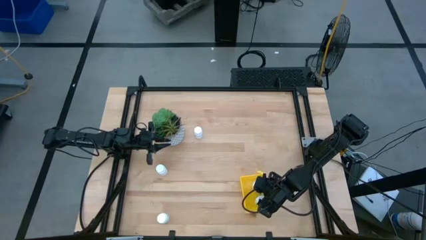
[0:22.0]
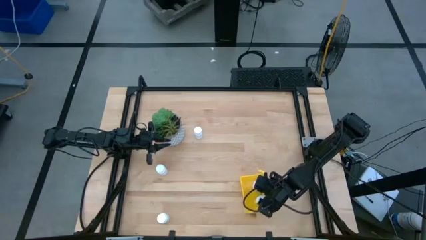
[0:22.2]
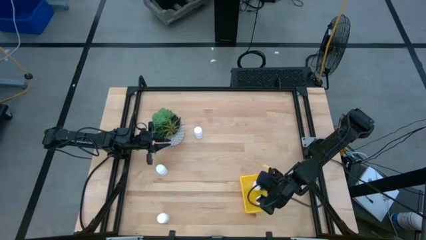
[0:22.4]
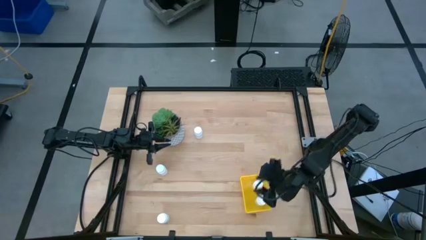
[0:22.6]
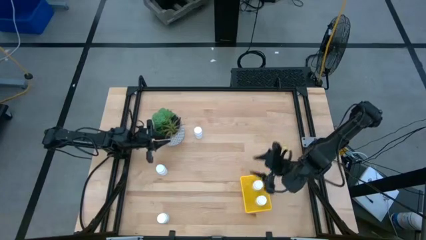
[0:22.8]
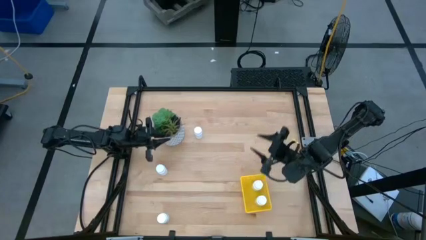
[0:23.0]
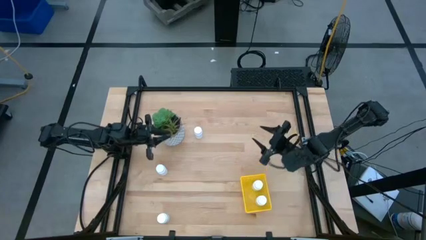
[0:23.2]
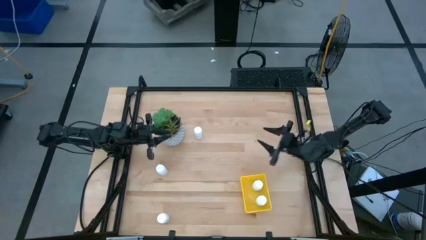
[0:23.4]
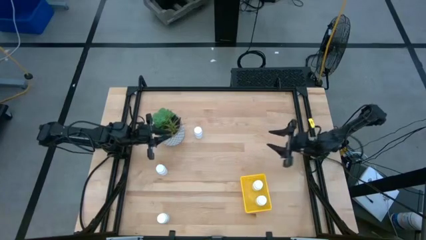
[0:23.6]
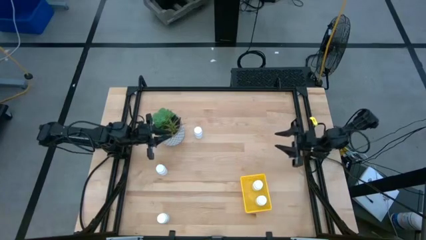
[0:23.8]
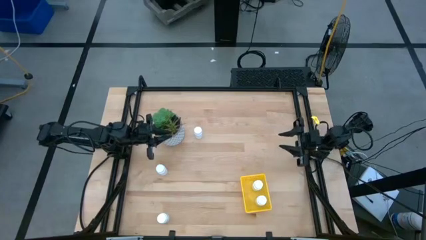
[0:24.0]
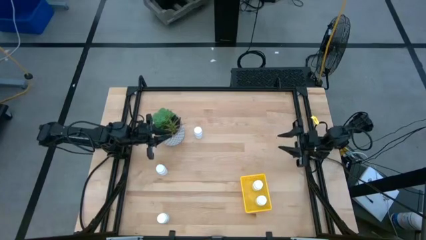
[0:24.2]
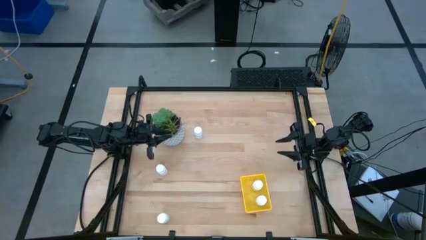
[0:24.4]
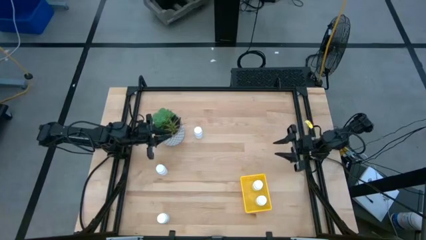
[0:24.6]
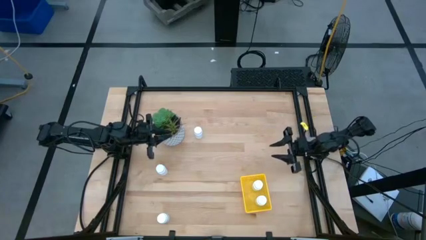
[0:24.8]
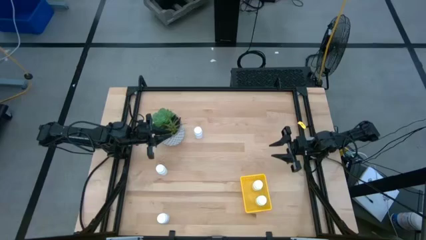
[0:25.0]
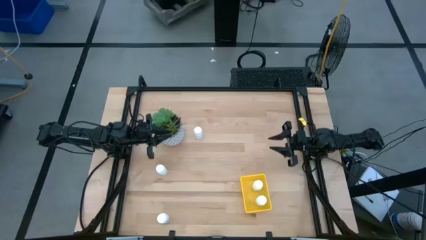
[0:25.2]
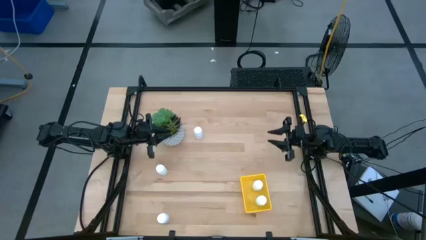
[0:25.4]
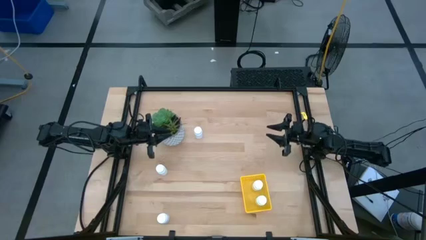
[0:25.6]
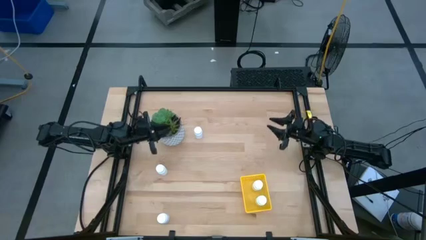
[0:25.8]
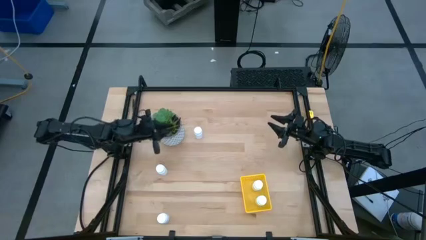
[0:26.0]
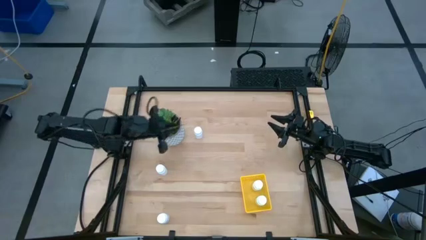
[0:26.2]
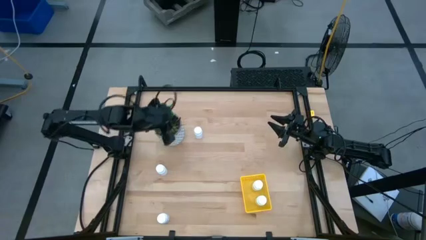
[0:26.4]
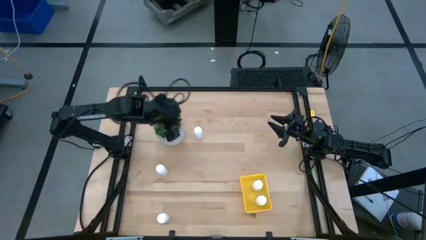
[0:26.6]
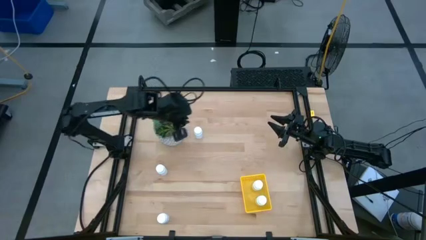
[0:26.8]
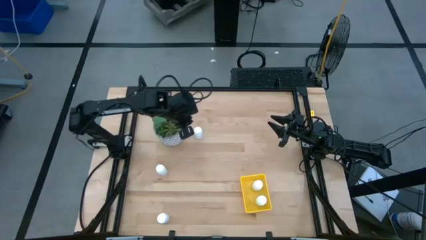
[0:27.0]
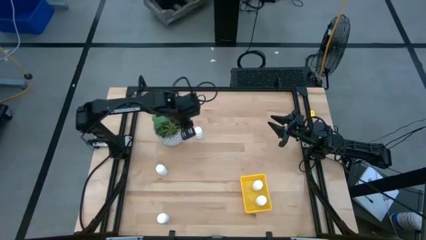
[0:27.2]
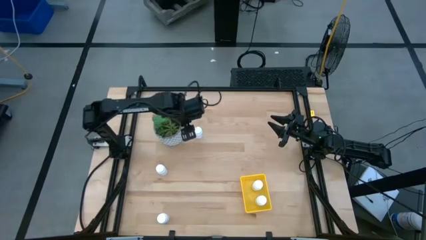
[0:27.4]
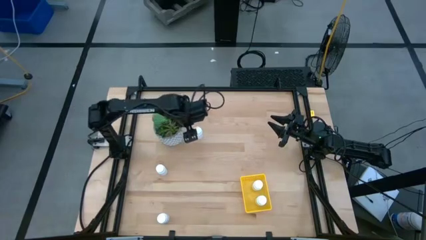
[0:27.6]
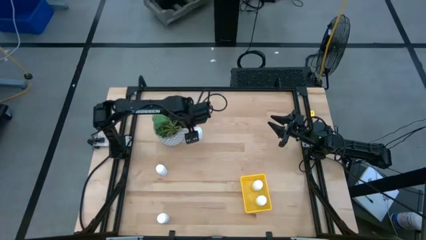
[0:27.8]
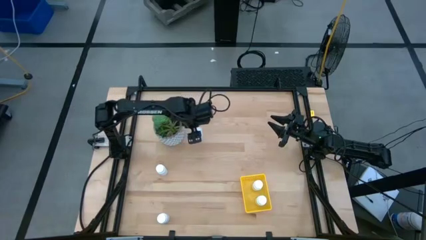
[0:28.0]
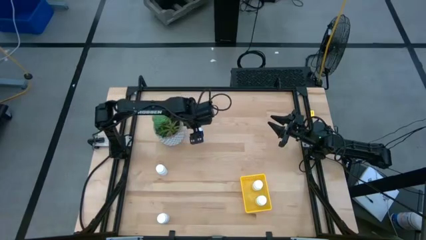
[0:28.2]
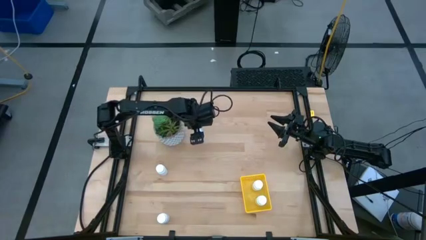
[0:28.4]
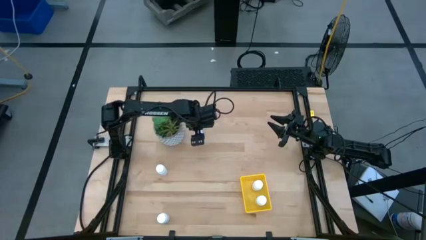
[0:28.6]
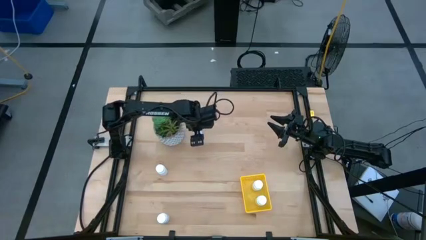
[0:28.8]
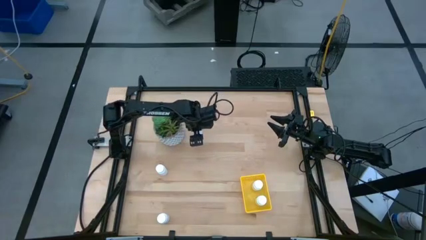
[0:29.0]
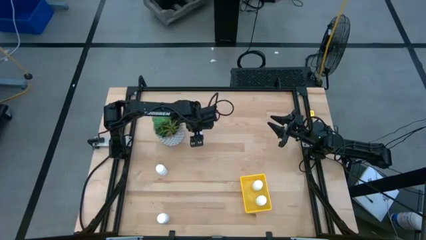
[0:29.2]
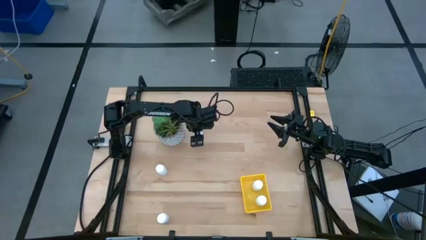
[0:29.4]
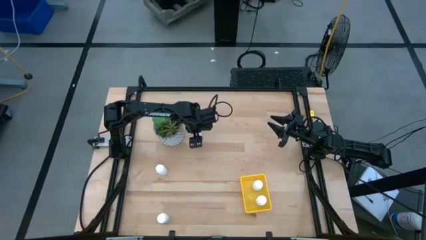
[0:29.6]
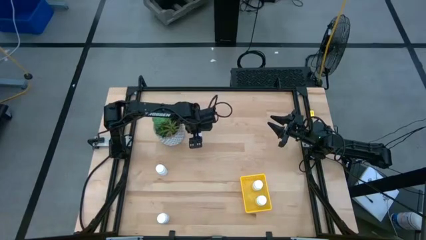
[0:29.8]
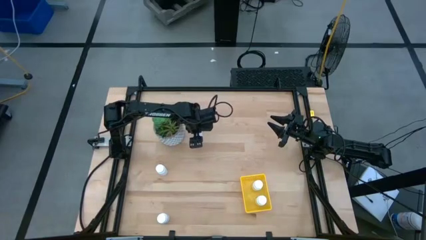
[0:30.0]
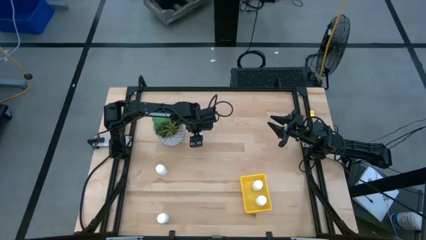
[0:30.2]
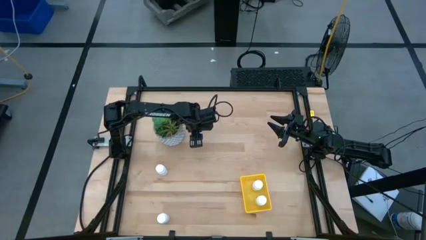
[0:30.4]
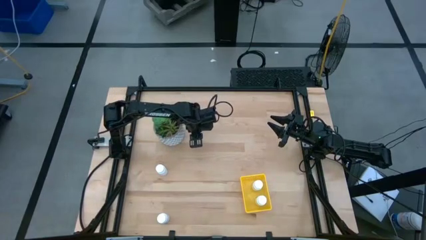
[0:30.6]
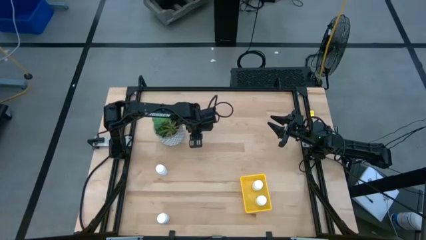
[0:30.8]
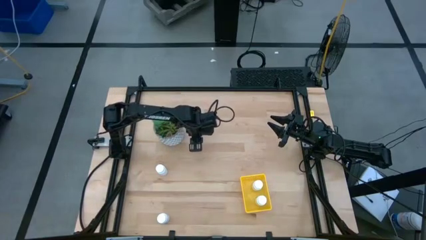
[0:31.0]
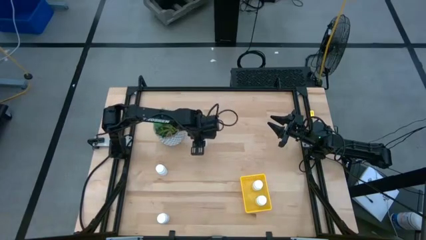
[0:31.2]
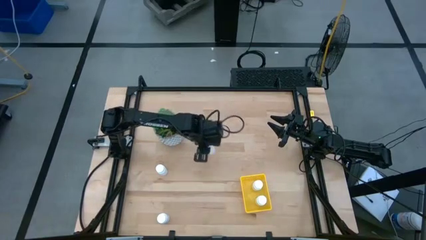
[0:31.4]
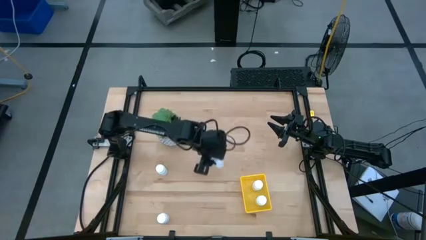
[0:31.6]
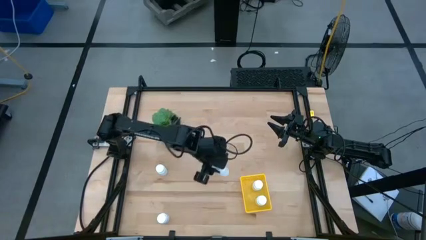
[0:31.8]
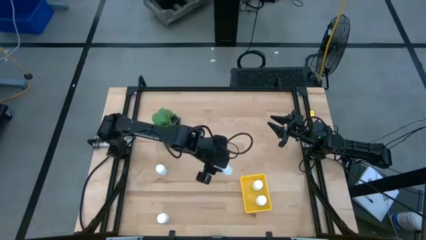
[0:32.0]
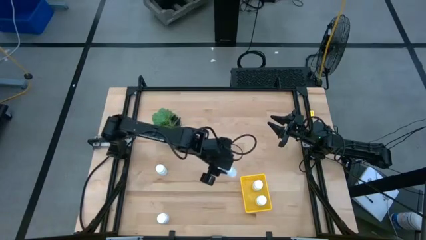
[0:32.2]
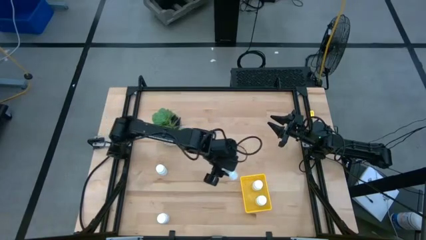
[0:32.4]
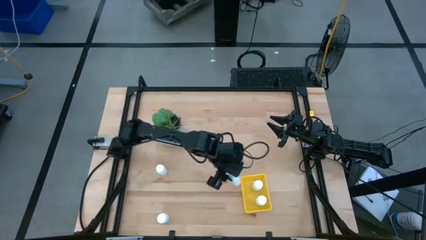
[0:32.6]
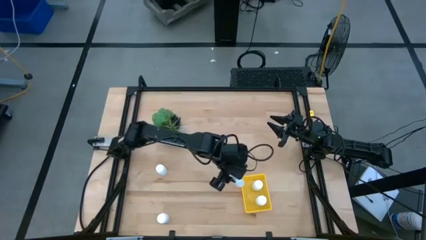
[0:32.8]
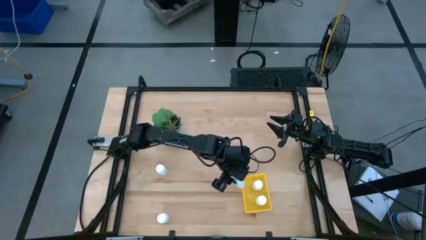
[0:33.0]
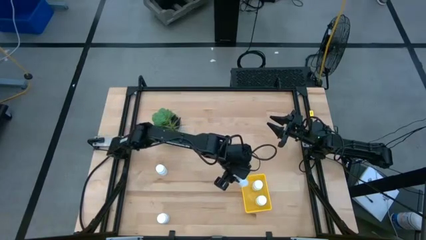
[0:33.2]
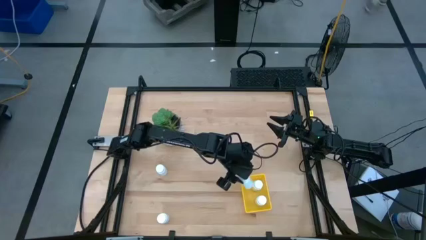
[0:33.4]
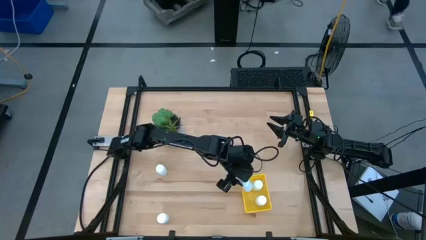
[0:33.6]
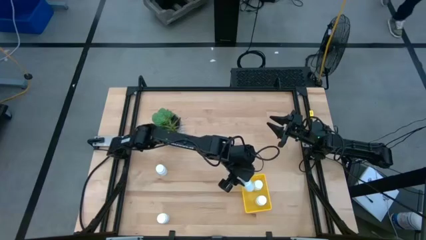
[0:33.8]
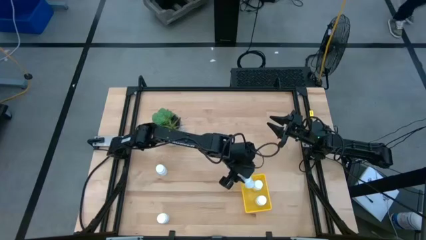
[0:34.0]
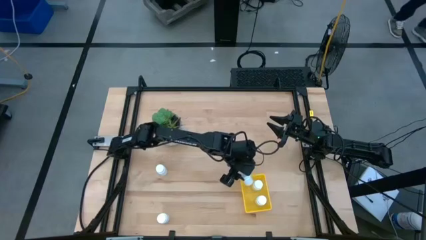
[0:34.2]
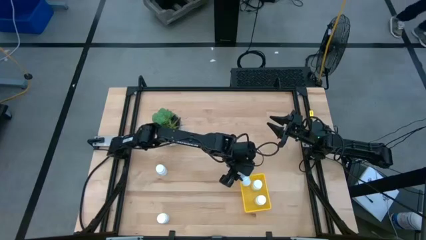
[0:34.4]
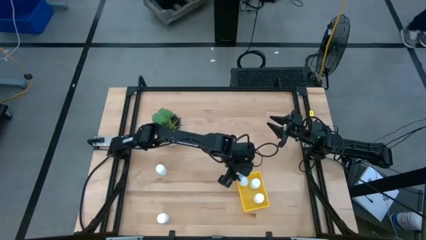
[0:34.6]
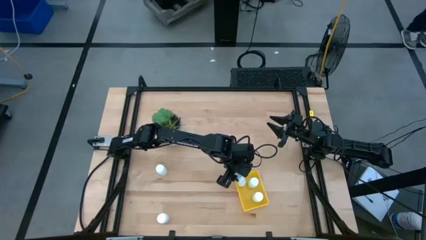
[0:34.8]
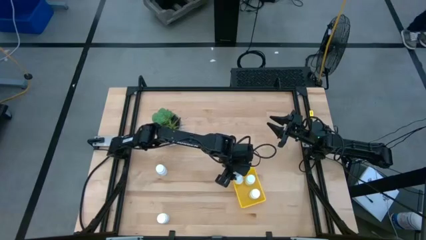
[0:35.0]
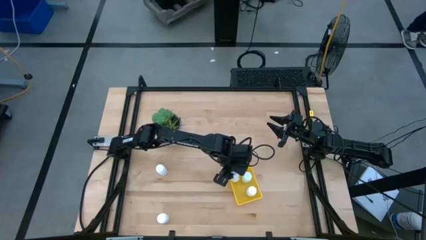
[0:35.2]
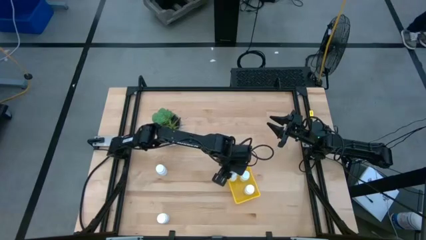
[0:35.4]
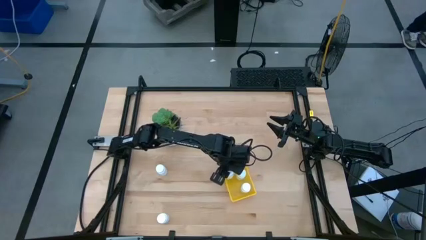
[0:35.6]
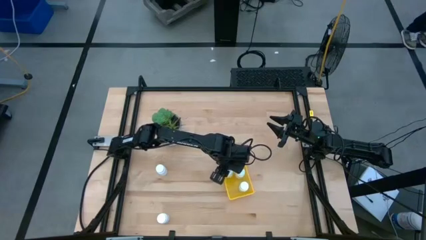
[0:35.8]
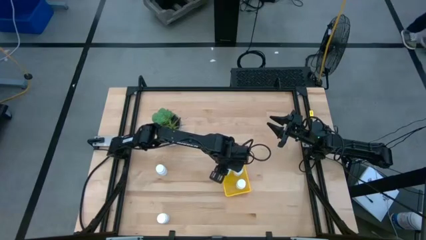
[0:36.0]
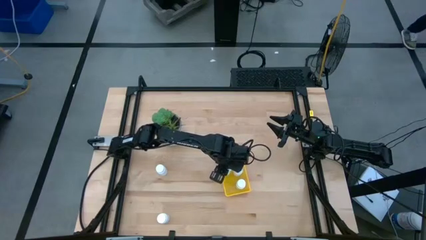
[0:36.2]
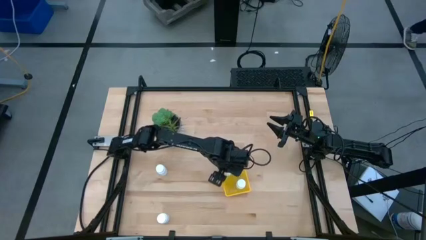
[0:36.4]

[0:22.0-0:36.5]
Task: Pick and place pill bottles into a basket
Put the top pill bottle into the basket

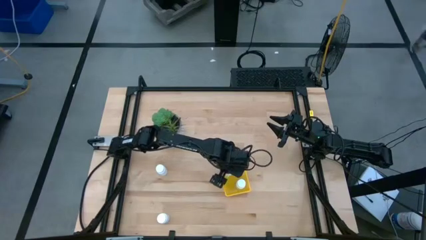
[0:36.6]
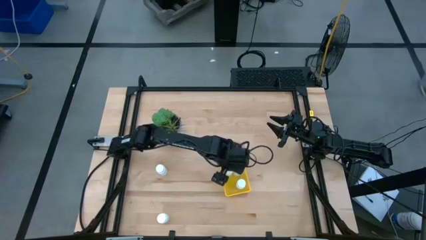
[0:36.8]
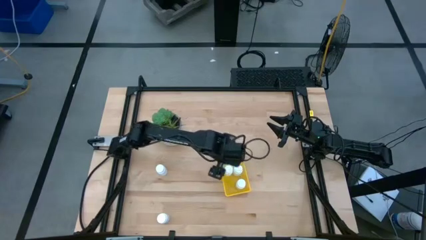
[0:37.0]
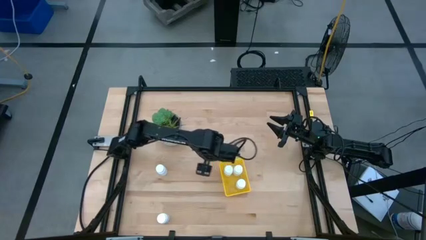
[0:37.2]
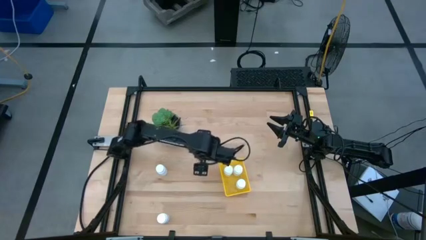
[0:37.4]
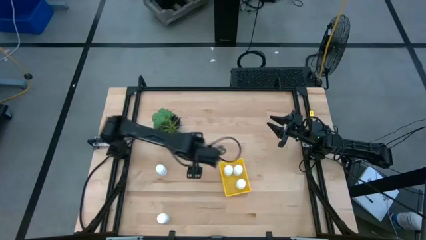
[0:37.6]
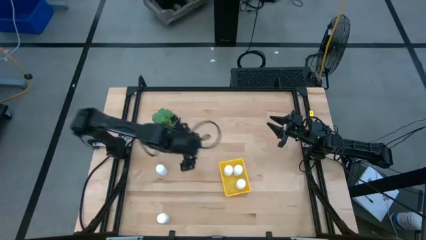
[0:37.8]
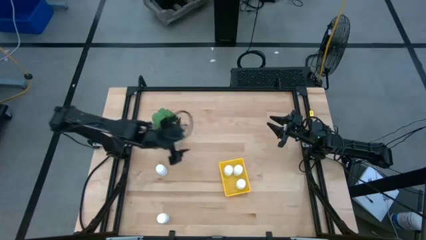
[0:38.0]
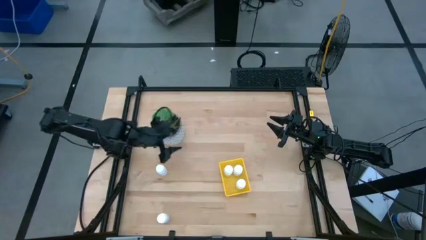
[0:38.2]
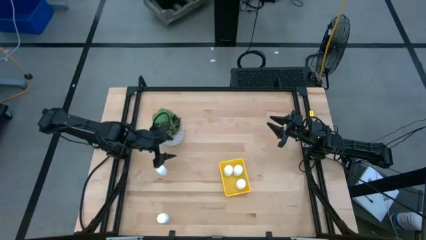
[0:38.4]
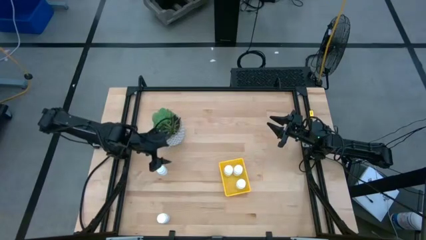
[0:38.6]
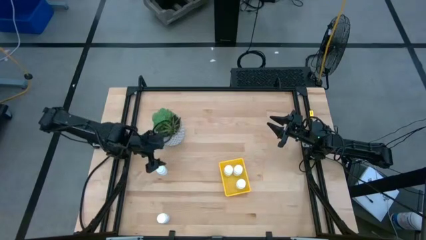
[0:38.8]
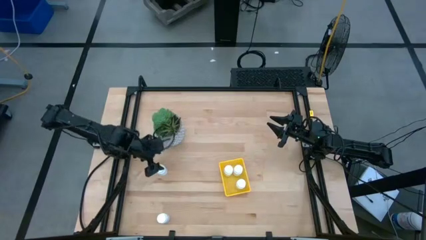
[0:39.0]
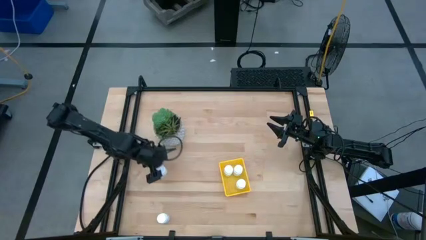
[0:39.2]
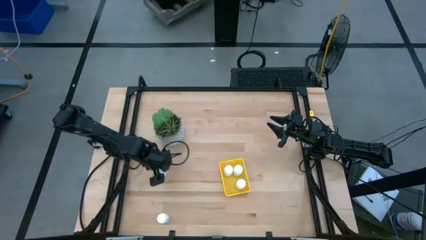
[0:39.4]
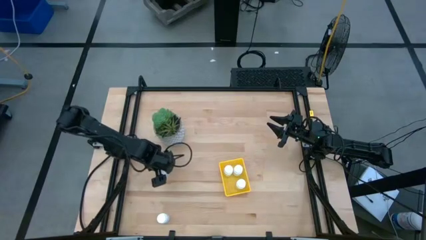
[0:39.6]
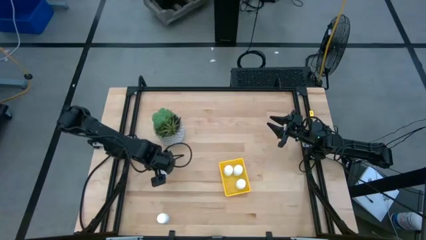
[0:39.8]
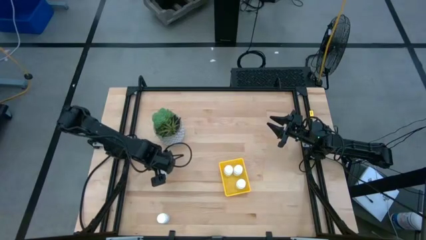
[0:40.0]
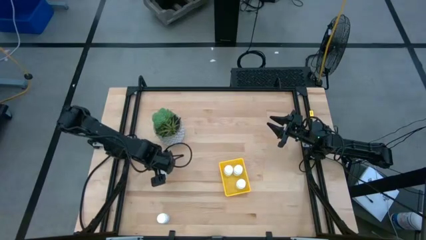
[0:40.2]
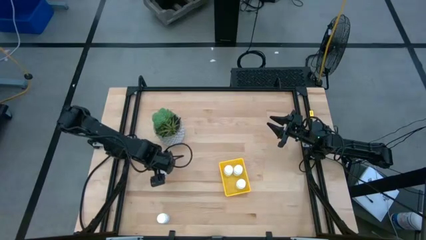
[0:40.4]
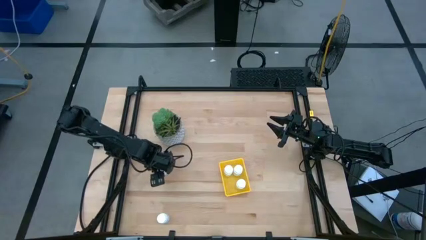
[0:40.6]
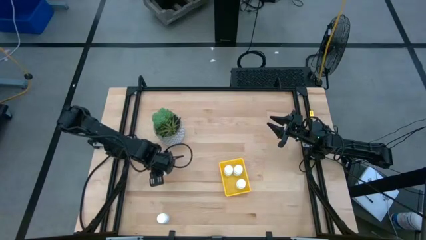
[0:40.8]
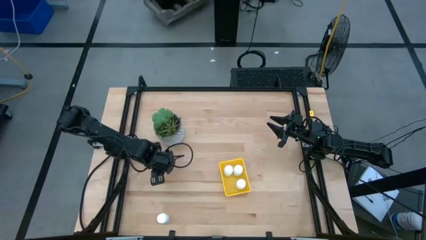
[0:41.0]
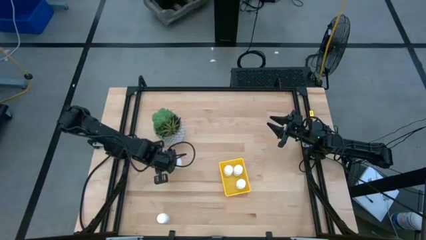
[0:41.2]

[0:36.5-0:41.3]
Put the top pill bottle into the basket
